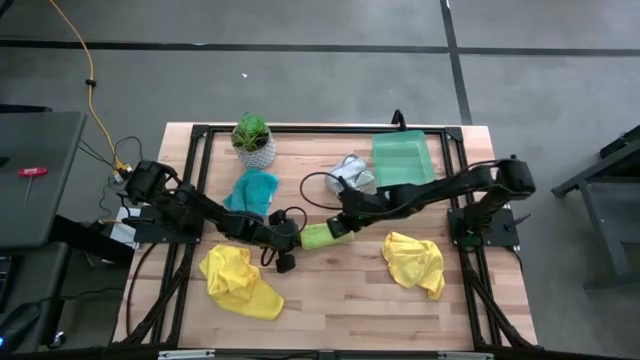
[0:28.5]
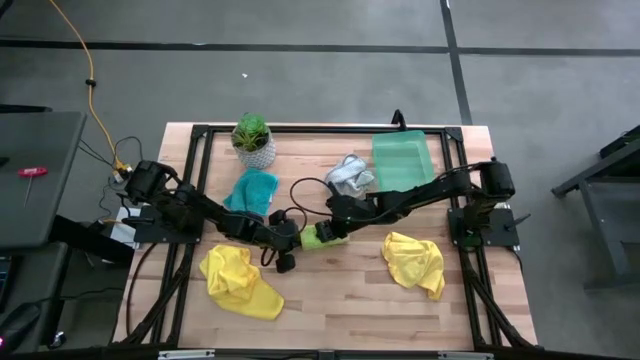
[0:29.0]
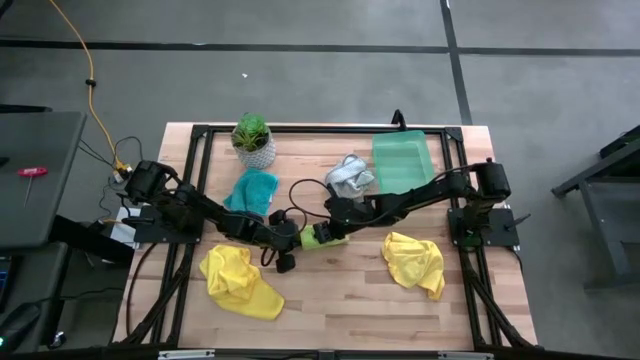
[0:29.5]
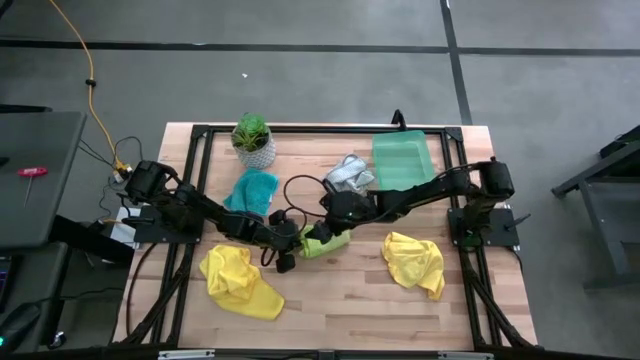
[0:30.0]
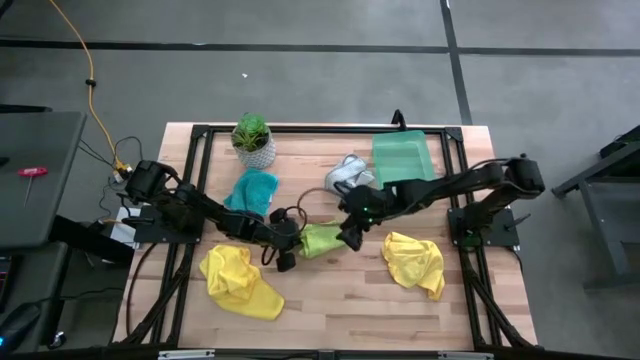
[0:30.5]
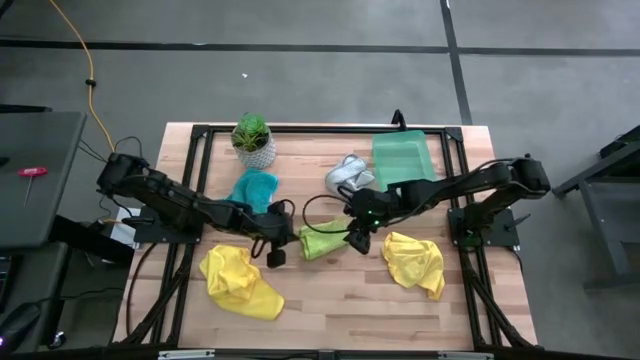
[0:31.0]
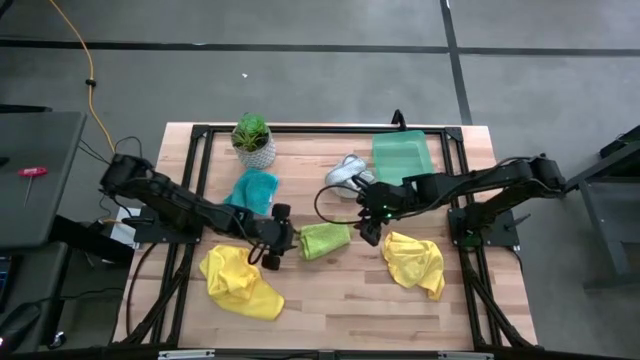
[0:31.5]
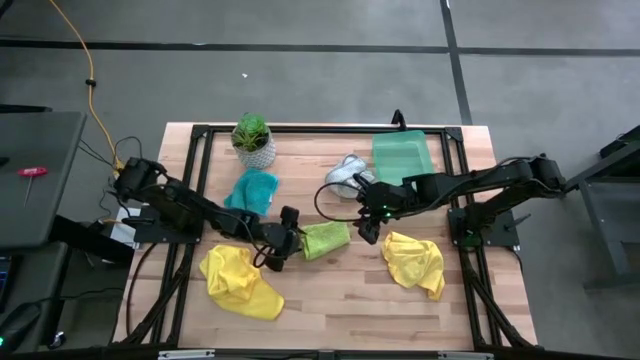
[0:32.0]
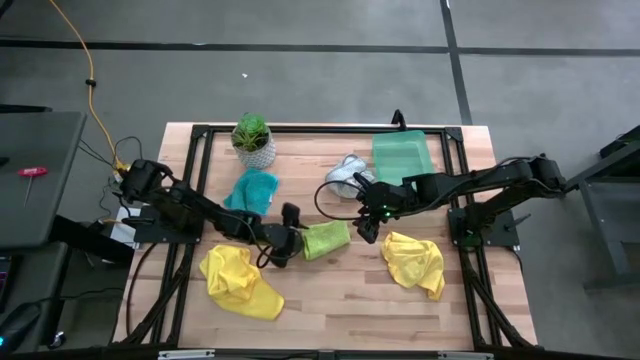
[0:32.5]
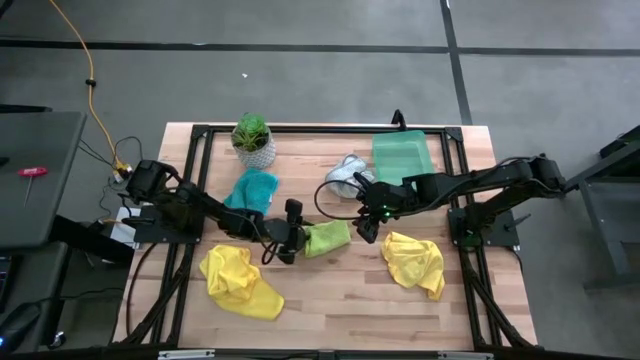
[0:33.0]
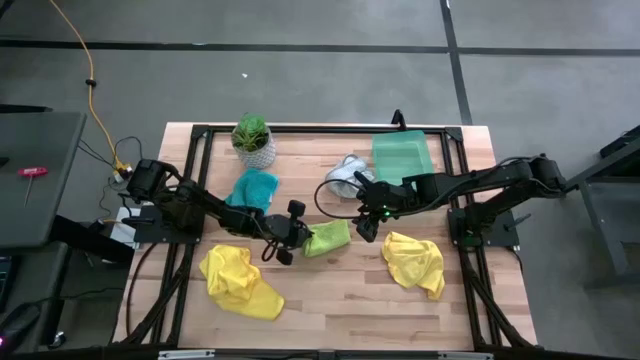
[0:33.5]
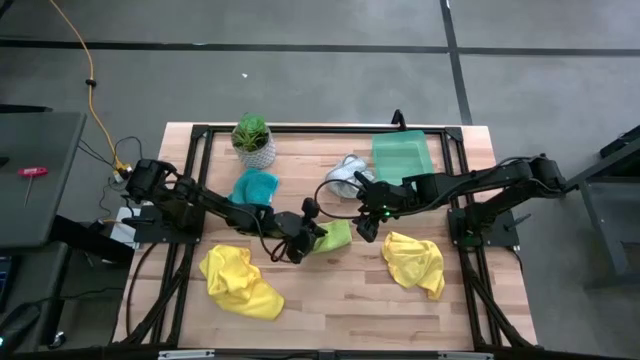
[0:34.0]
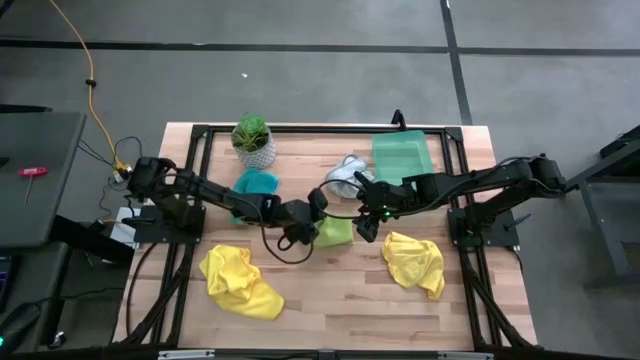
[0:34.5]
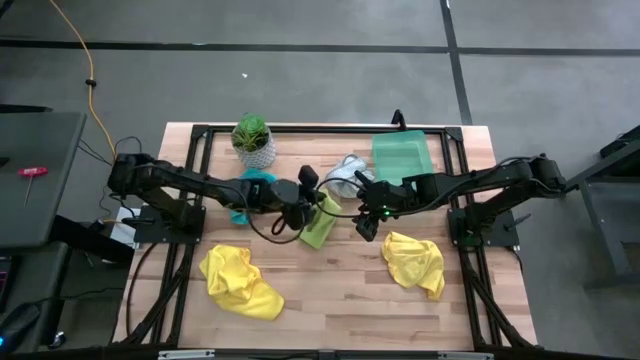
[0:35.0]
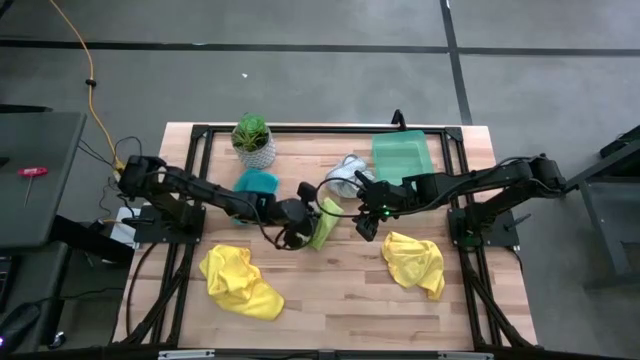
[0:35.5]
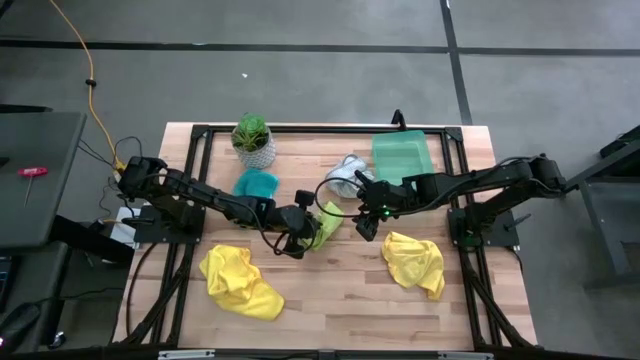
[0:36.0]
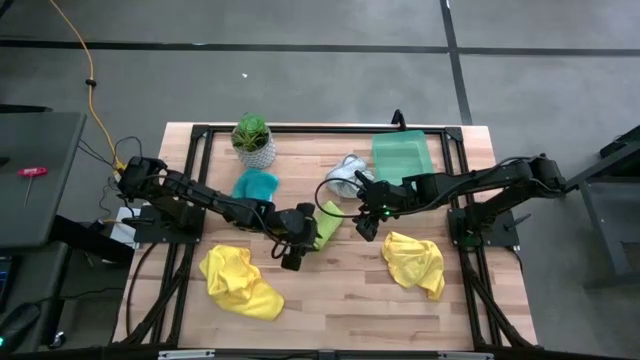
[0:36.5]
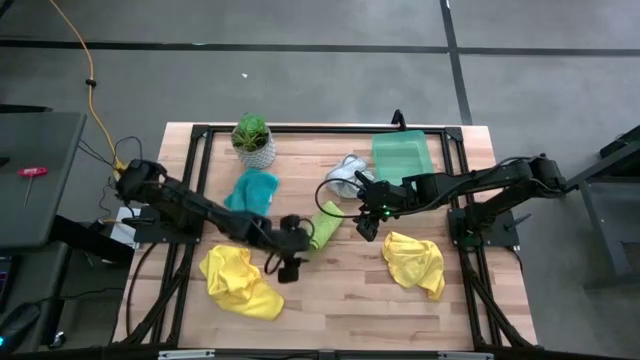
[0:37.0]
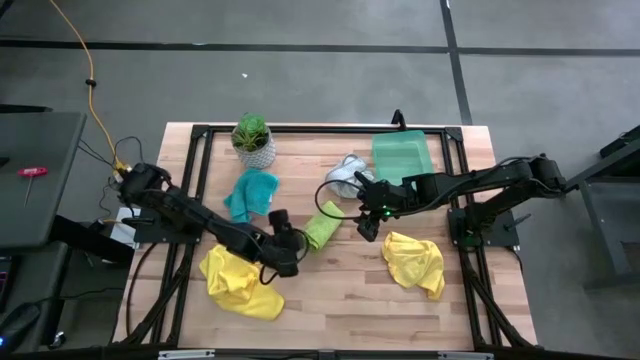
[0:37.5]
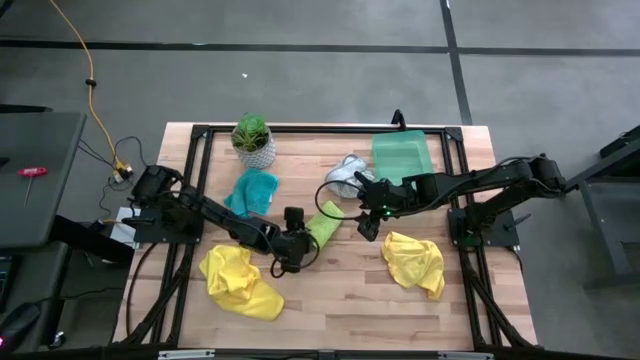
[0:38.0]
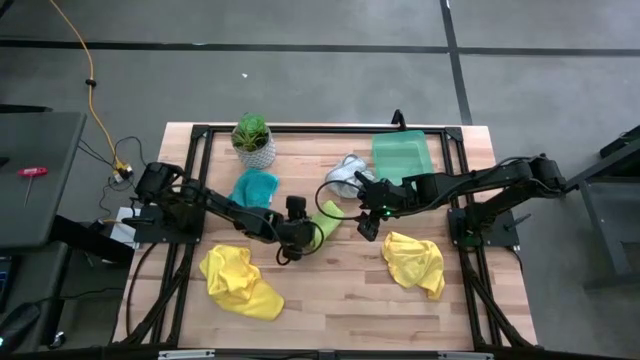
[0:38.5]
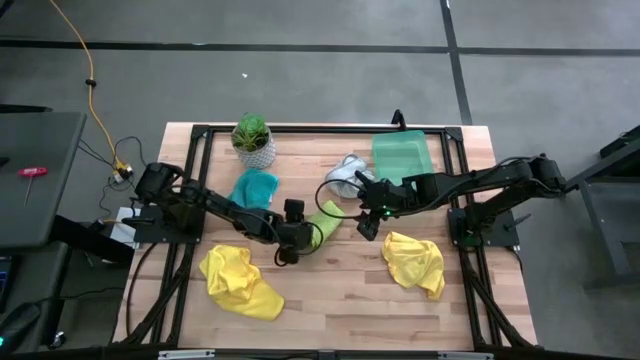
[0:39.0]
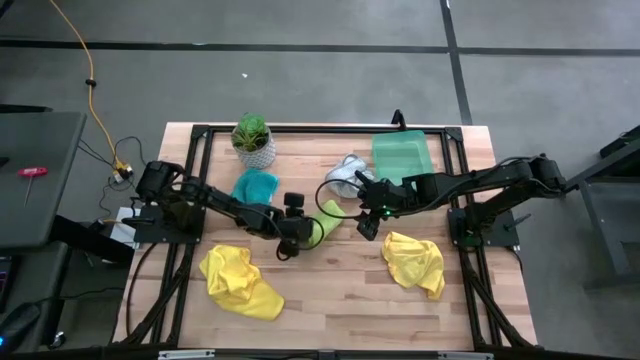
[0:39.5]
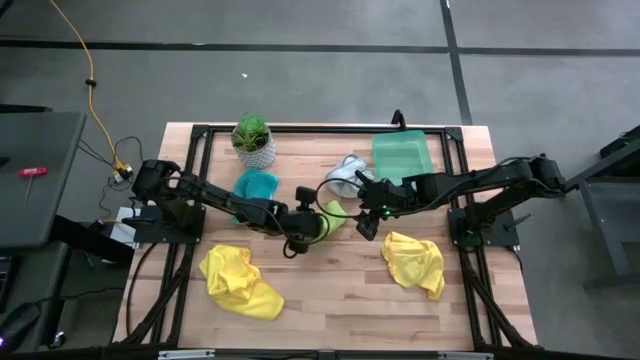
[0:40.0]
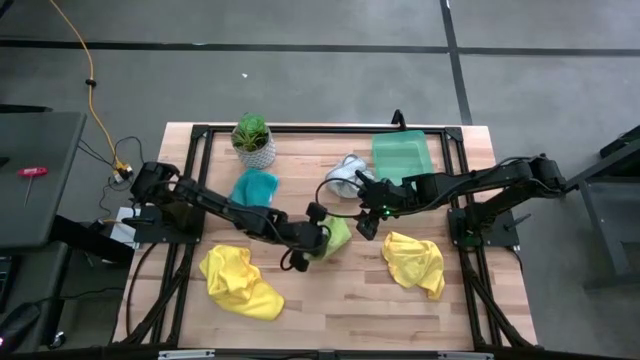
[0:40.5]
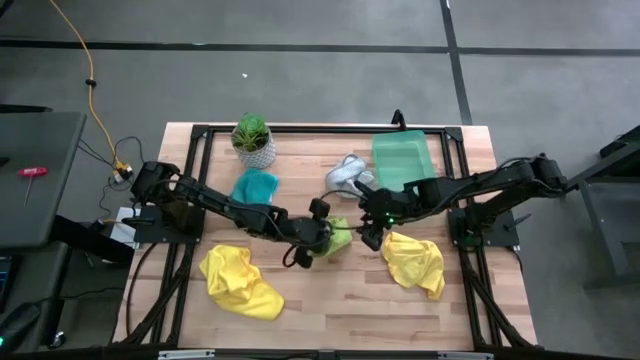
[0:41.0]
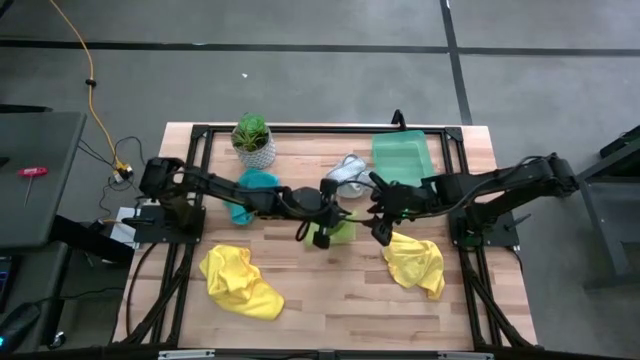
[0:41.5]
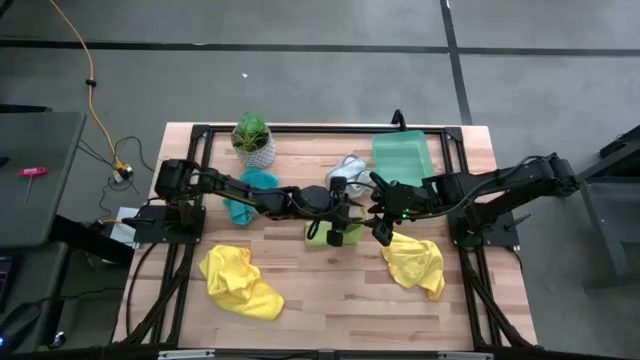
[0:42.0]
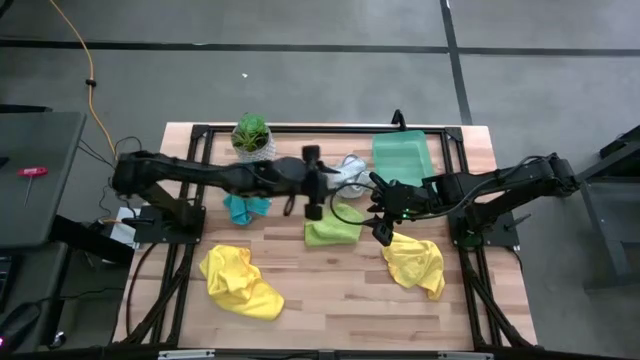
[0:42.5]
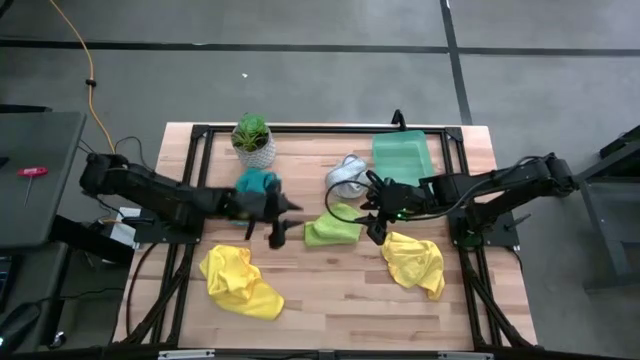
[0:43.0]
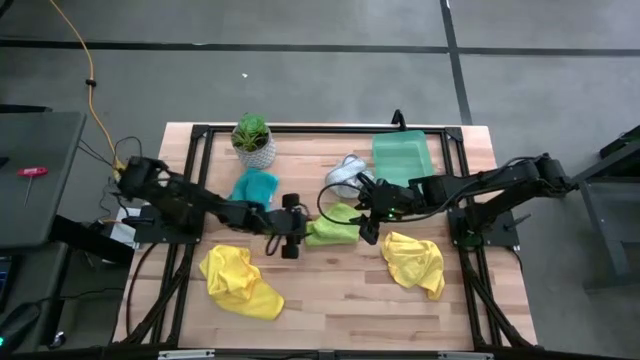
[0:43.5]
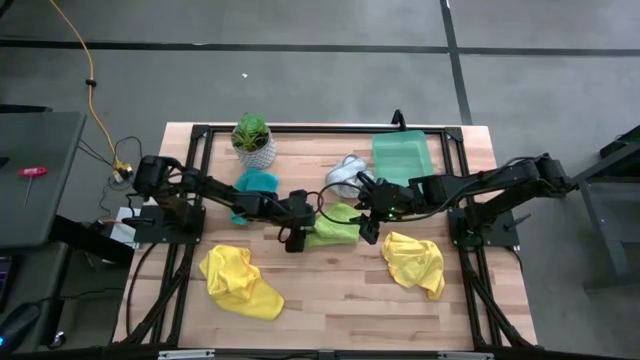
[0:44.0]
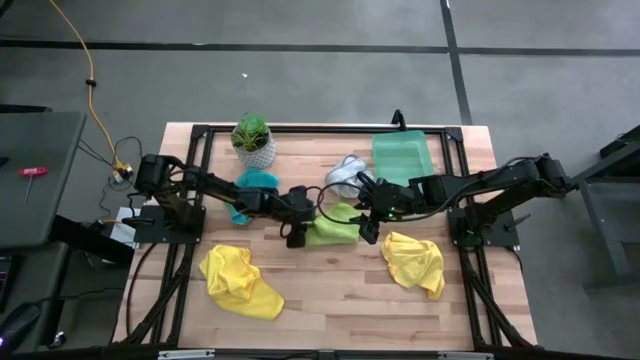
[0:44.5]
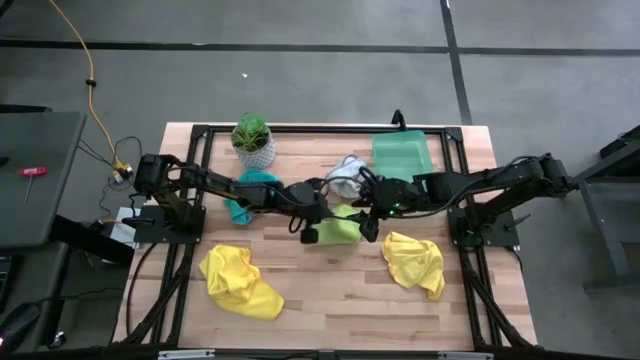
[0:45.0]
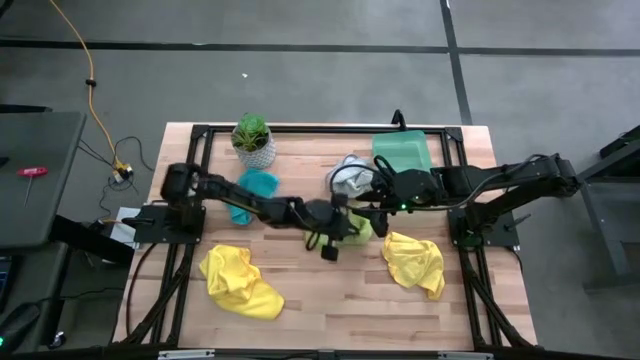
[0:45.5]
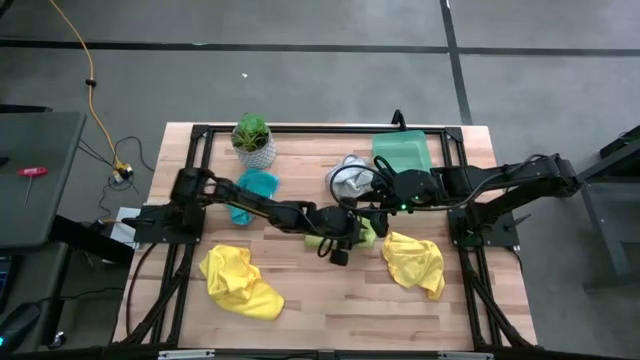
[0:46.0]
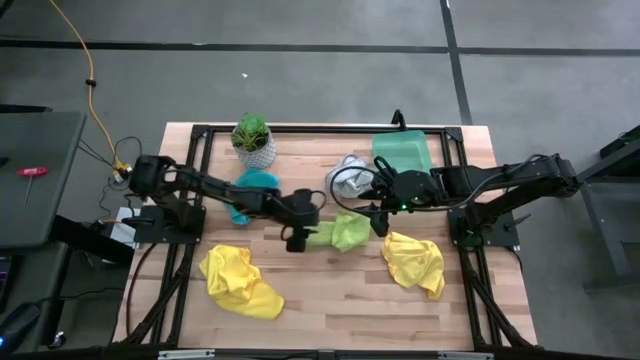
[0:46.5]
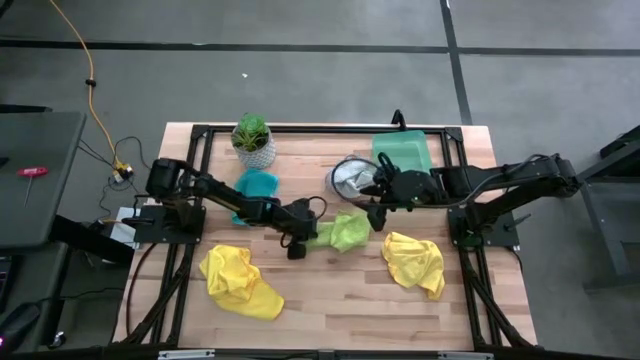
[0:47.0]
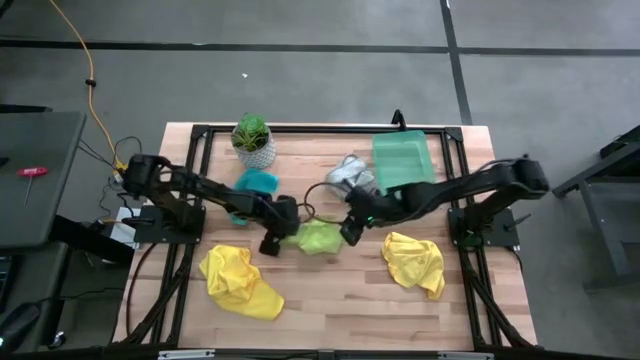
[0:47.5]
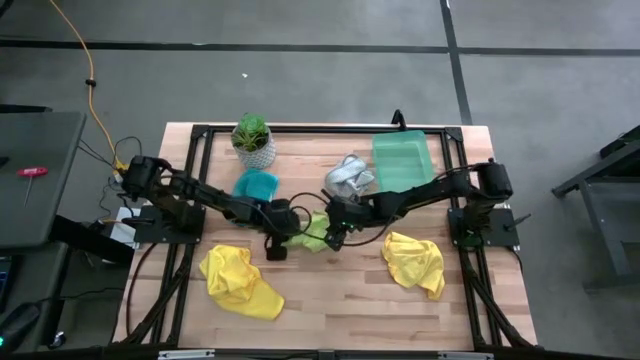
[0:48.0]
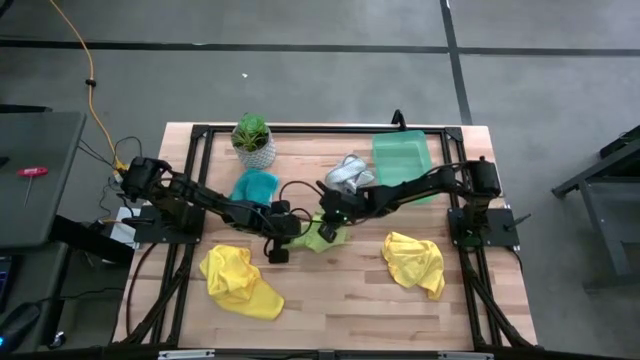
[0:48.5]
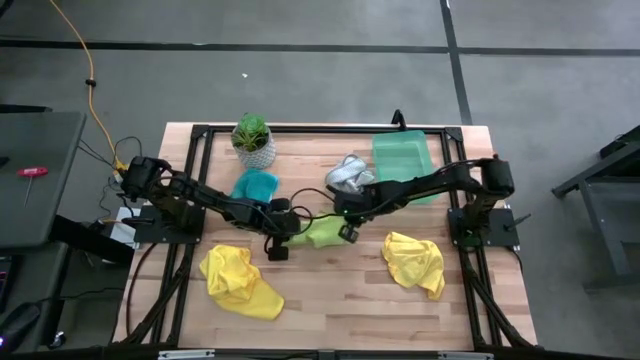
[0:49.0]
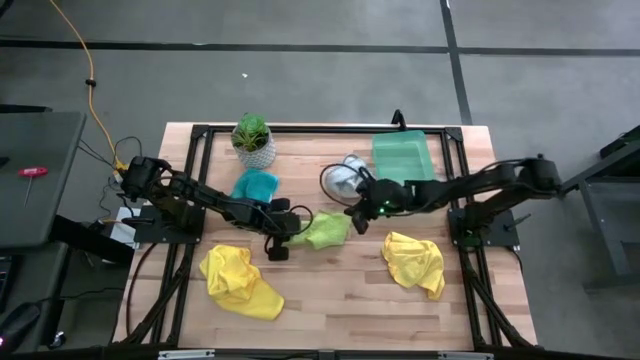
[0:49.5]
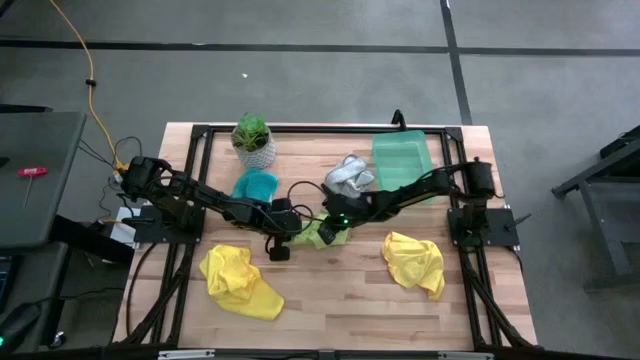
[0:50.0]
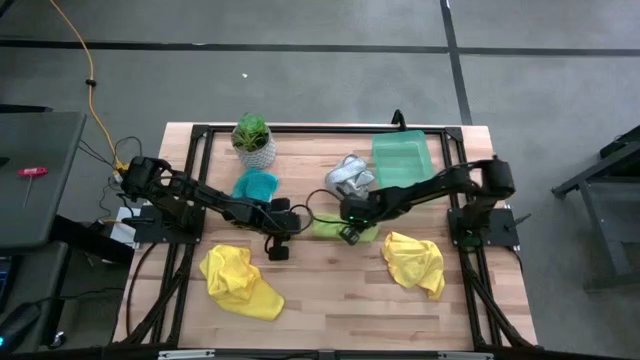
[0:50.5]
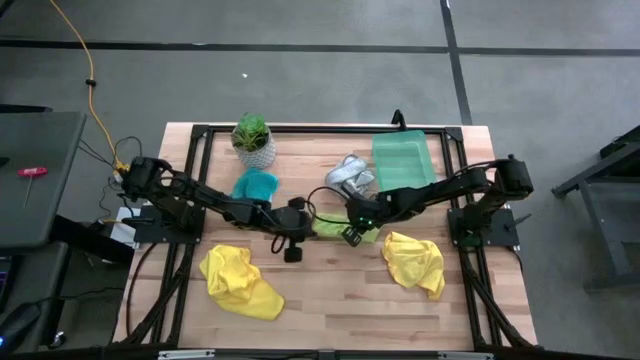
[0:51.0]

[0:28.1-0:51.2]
Task: Fold microfiber towels
Fold the green microfiber cloth
